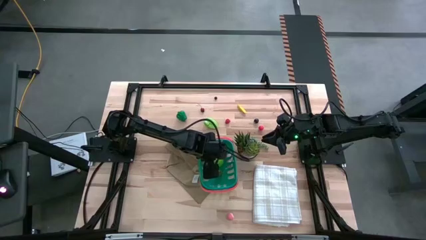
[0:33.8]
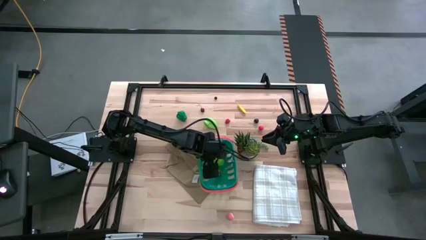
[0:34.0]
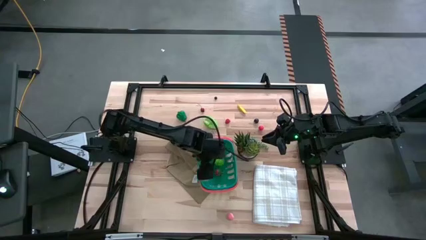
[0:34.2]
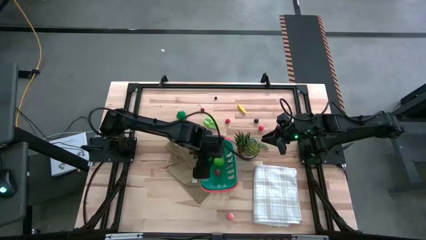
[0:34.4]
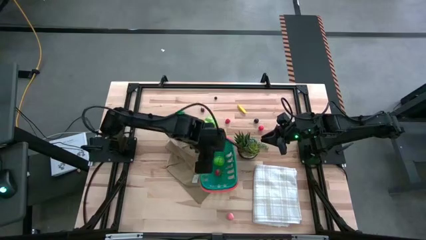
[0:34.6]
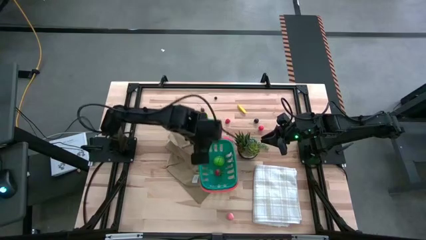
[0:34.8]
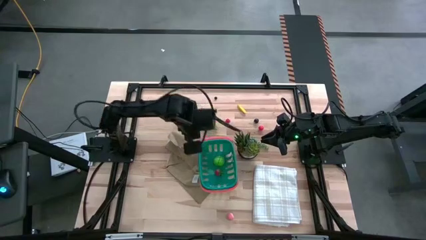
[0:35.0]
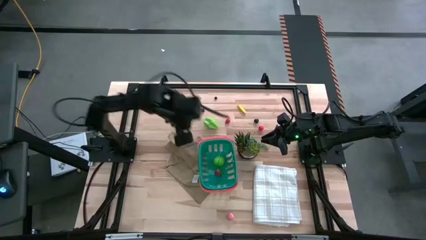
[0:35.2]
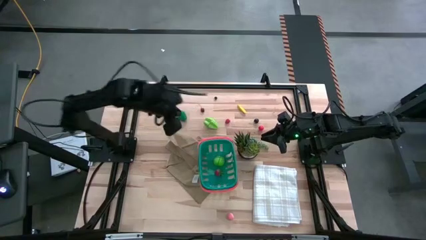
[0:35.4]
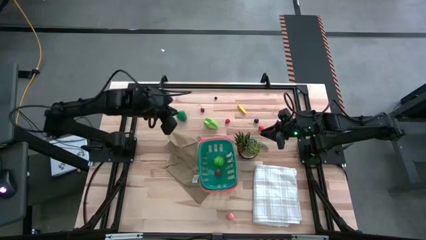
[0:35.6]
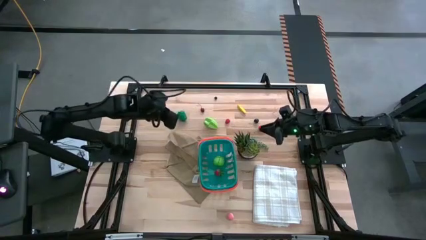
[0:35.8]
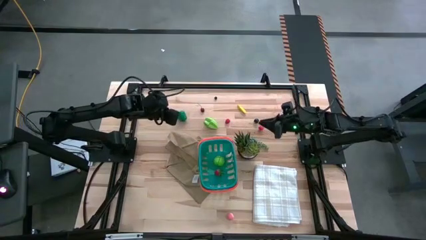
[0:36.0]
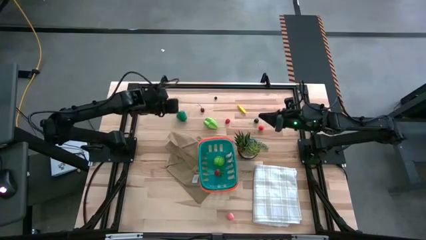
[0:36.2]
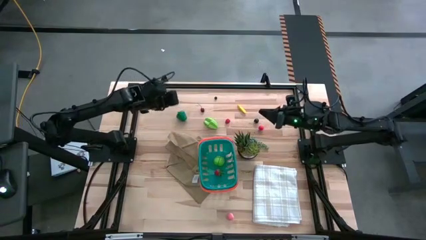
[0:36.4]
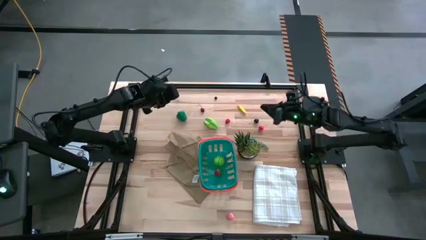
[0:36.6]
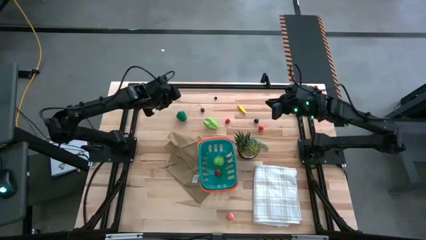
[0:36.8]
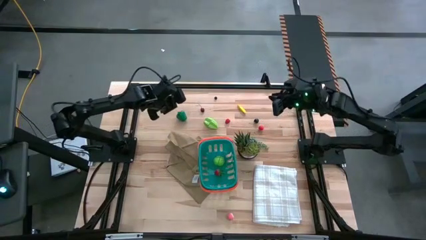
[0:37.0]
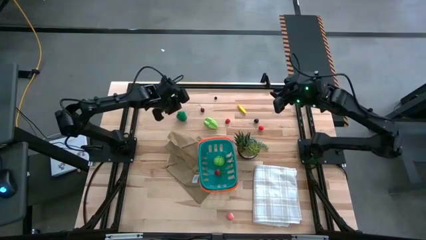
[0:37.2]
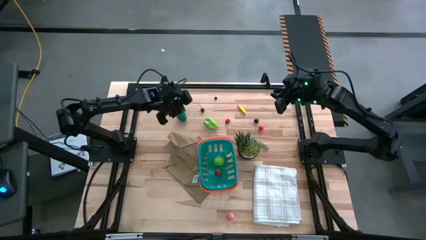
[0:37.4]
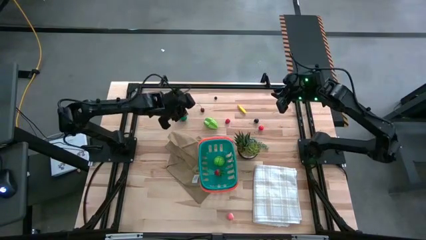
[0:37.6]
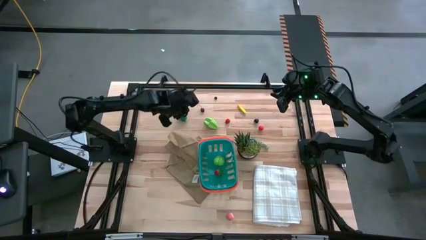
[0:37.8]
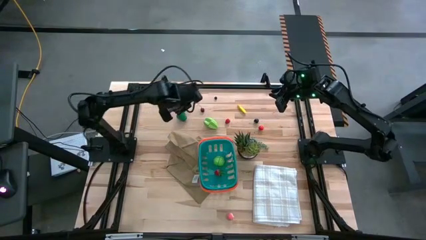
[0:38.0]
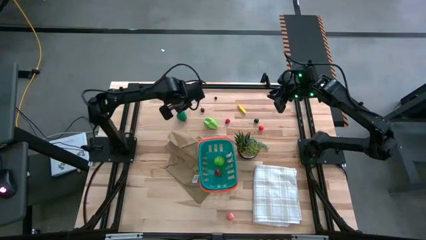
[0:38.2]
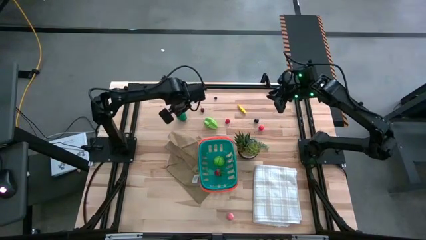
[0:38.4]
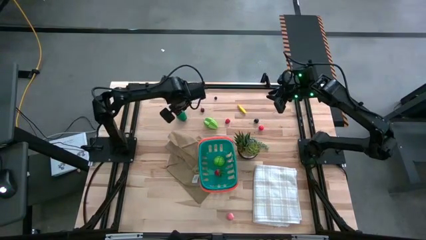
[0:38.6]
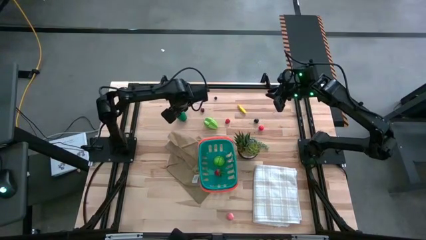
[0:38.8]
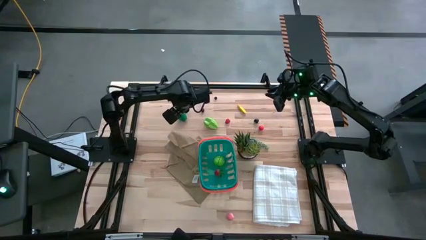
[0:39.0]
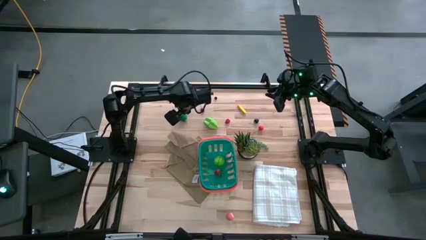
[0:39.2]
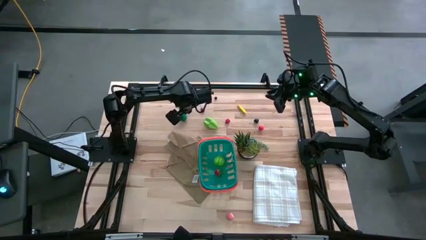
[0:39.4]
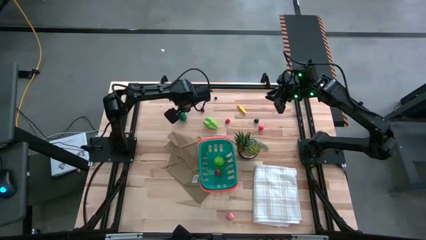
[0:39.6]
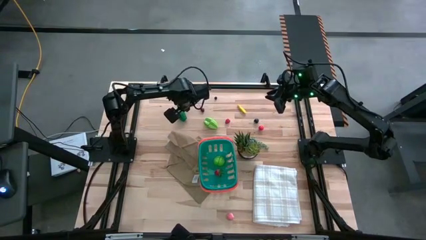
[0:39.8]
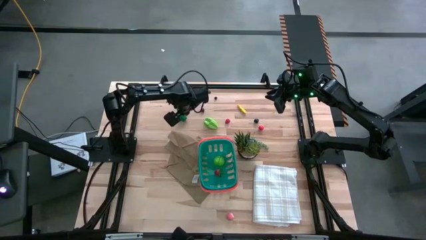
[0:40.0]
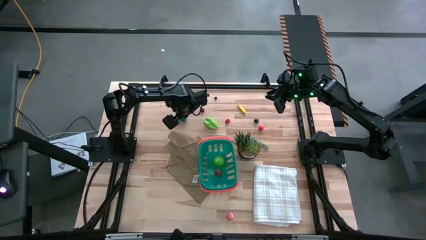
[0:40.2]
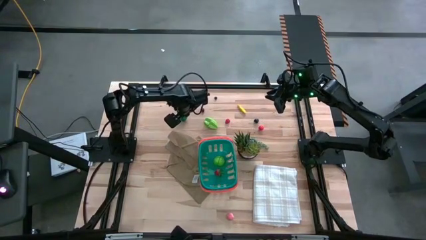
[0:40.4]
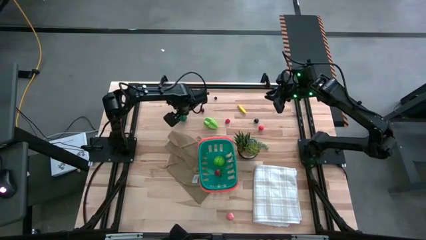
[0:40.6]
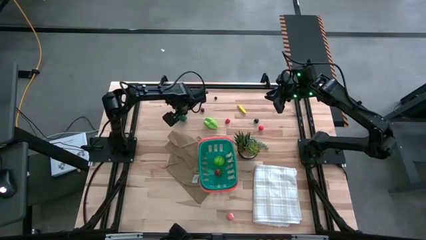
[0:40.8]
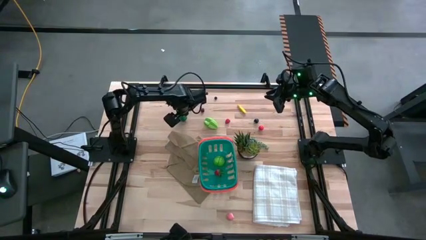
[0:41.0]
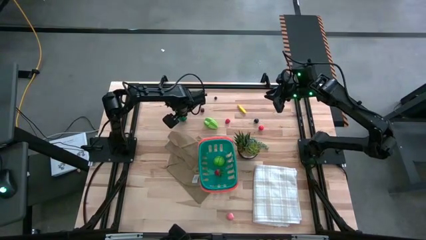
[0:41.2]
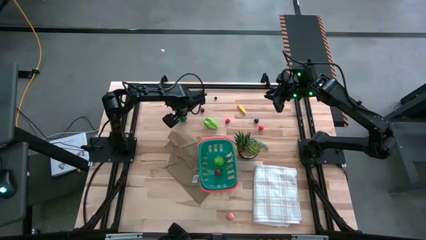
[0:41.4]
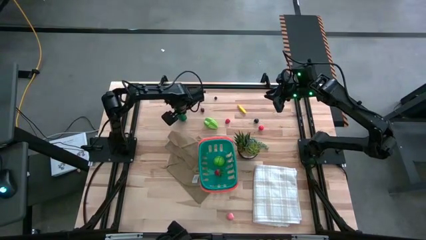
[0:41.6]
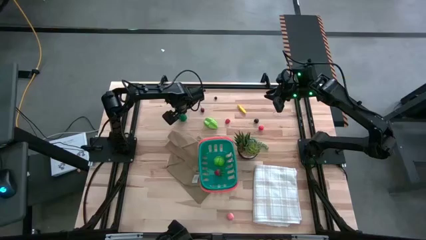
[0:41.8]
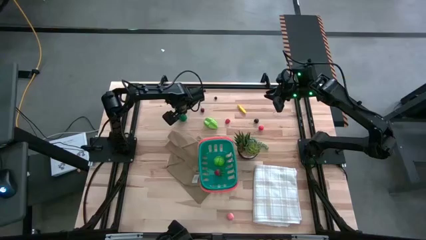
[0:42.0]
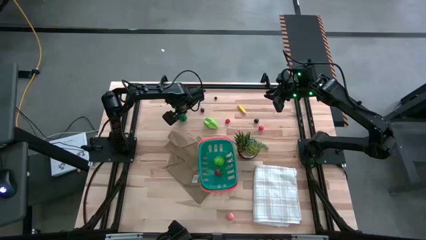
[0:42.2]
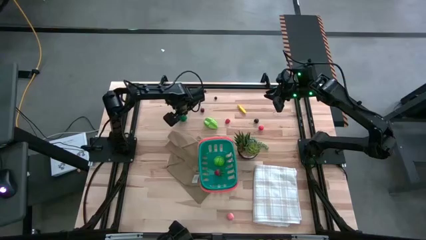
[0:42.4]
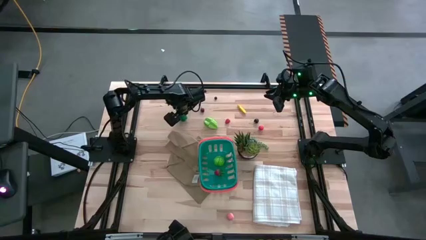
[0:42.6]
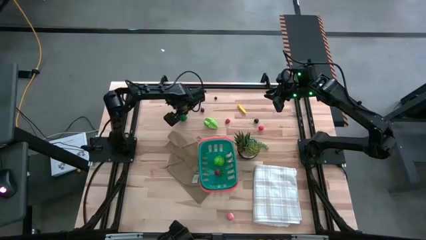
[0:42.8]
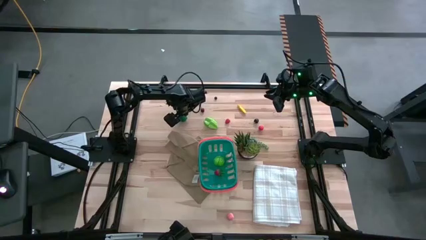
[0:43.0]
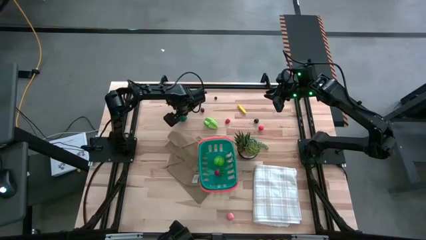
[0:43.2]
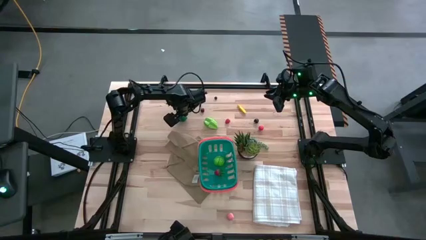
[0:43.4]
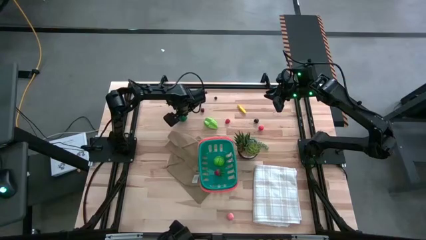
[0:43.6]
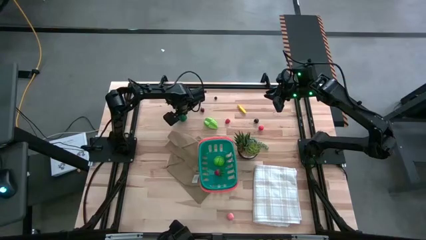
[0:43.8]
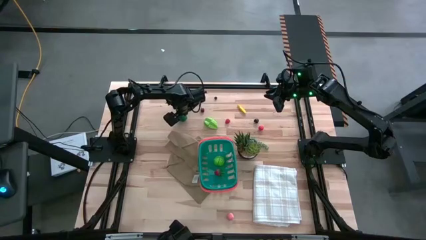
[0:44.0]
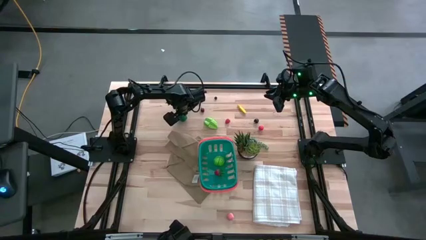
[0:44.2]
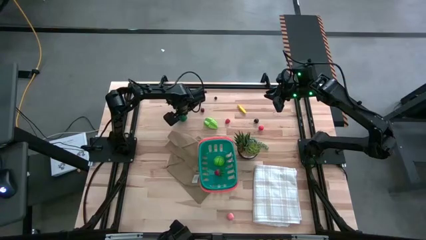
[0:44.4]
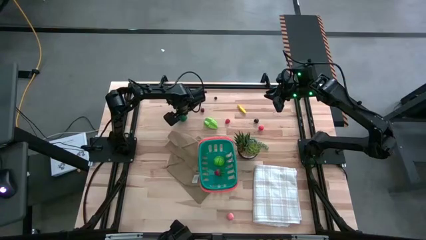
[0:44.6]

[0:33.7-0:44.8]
Task: Pick and placing Produce into tupperware
Put the green bell pepper into the green basket
